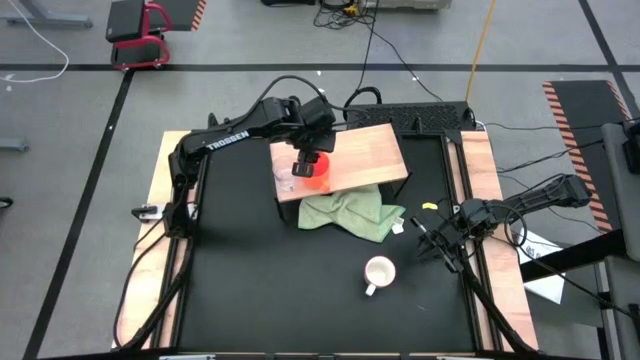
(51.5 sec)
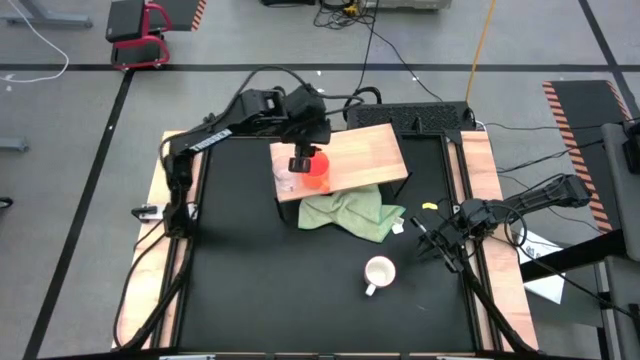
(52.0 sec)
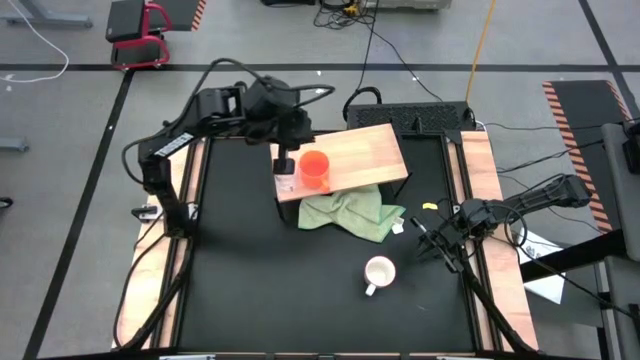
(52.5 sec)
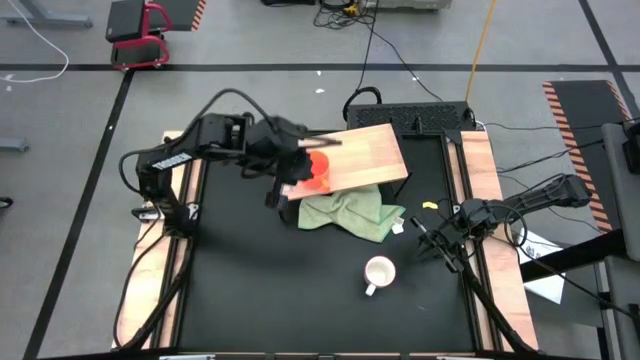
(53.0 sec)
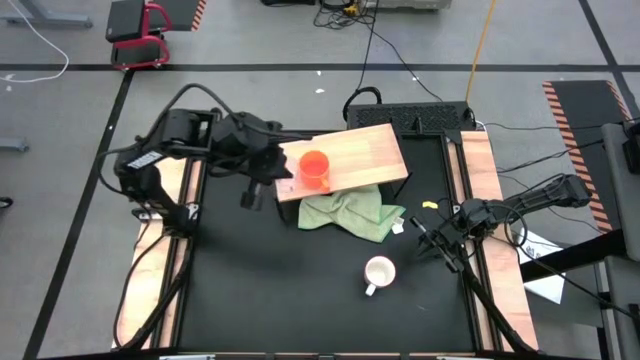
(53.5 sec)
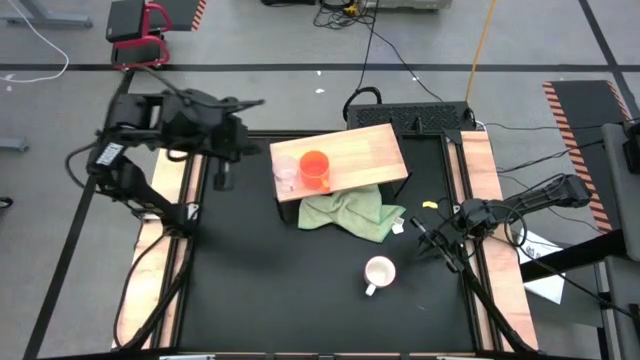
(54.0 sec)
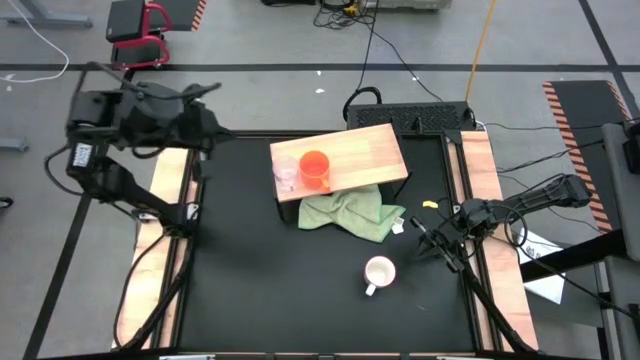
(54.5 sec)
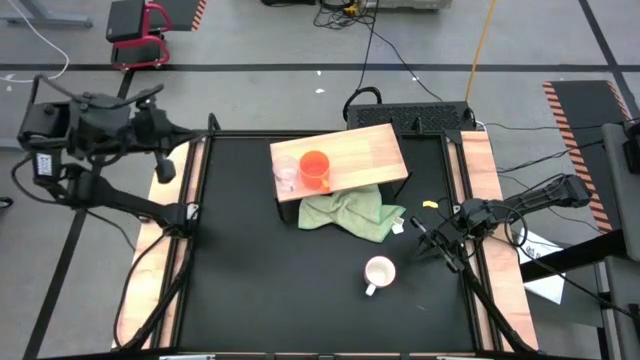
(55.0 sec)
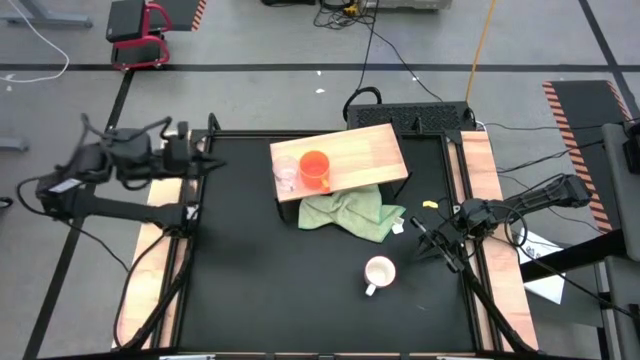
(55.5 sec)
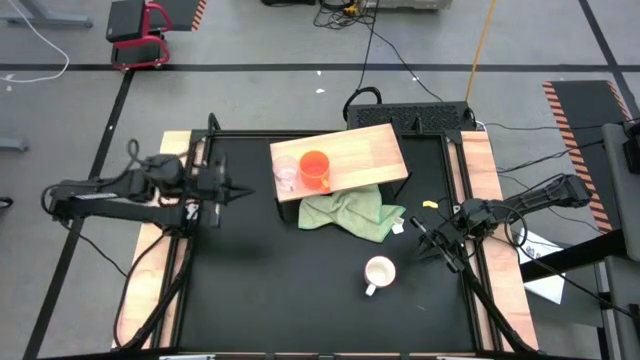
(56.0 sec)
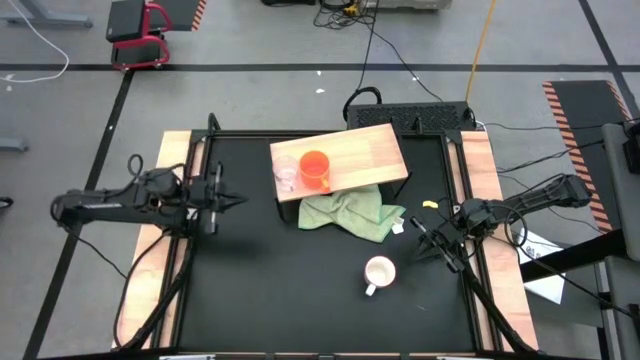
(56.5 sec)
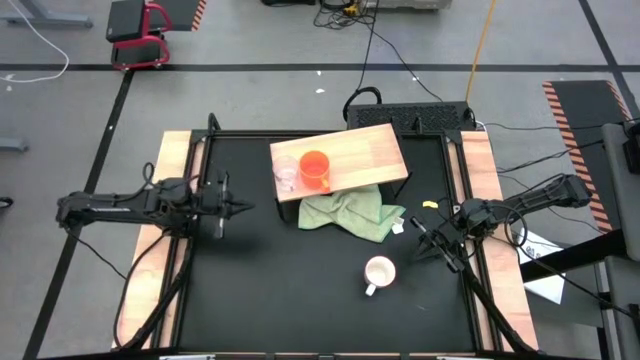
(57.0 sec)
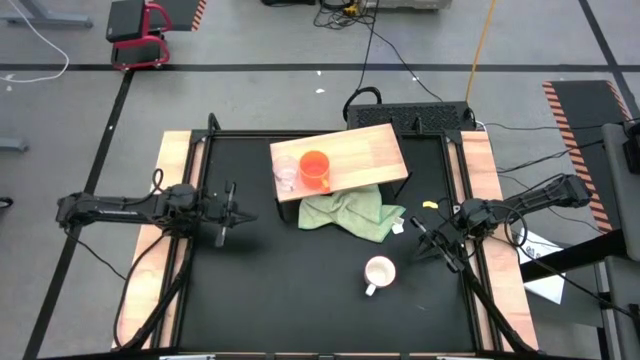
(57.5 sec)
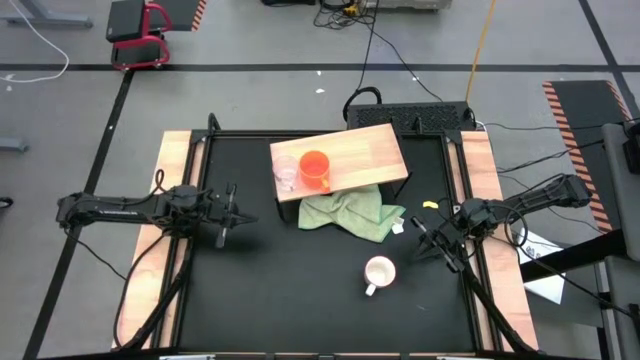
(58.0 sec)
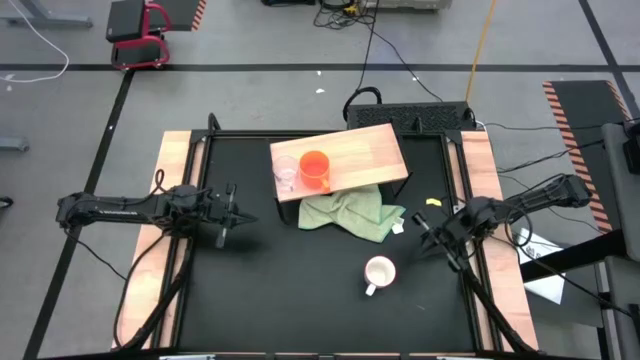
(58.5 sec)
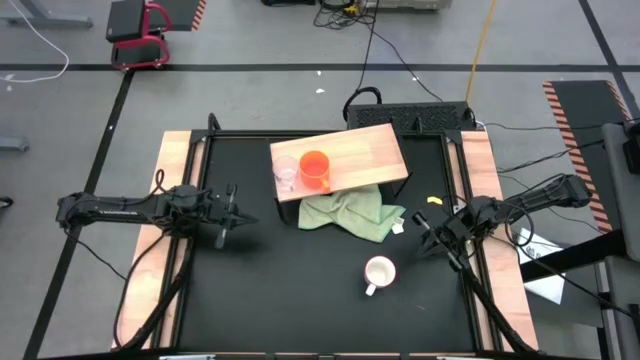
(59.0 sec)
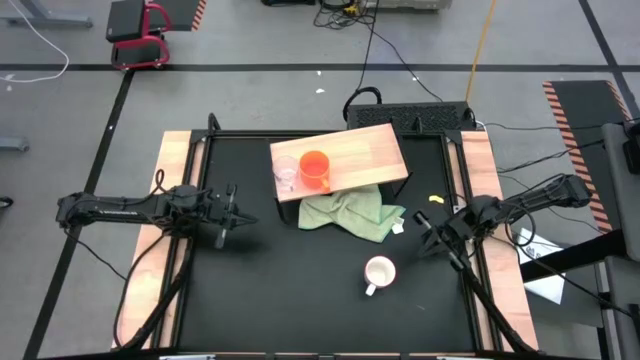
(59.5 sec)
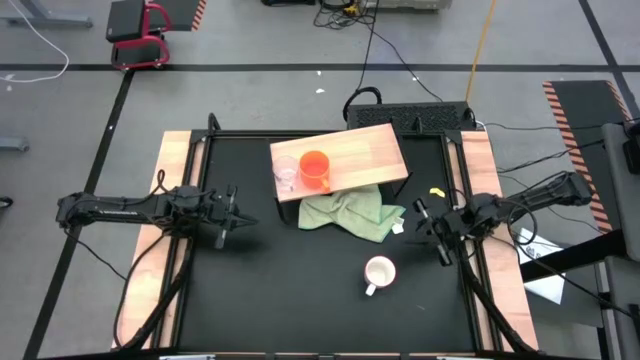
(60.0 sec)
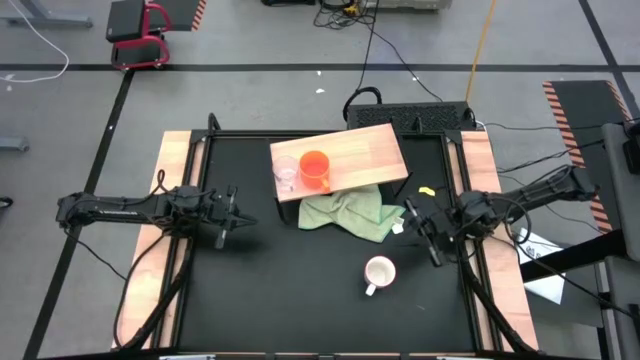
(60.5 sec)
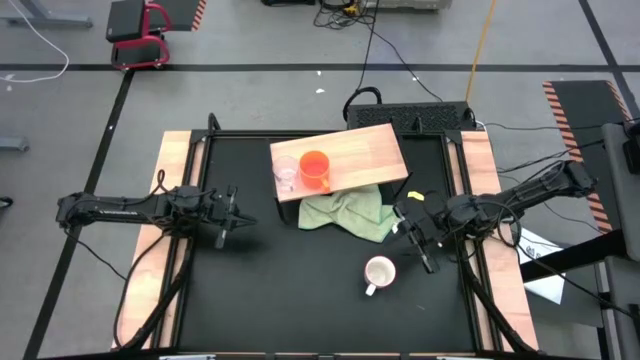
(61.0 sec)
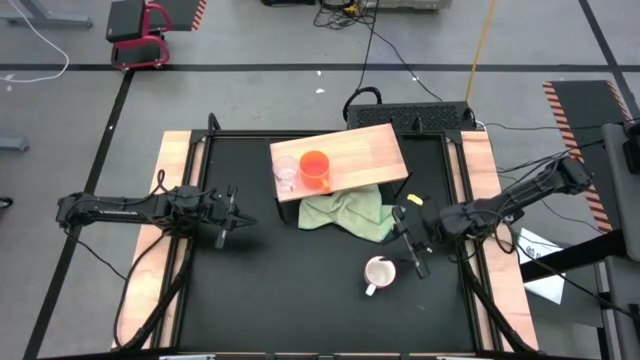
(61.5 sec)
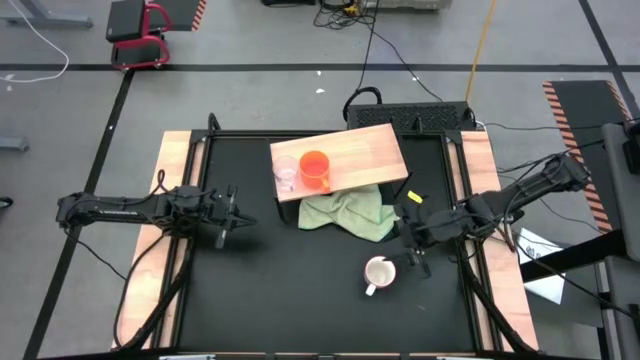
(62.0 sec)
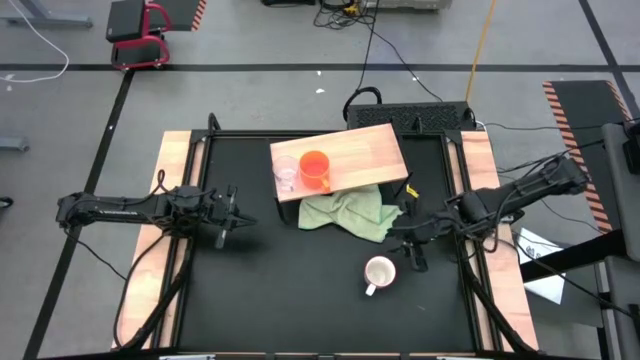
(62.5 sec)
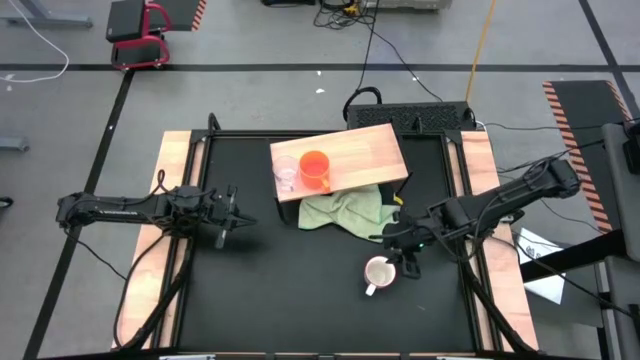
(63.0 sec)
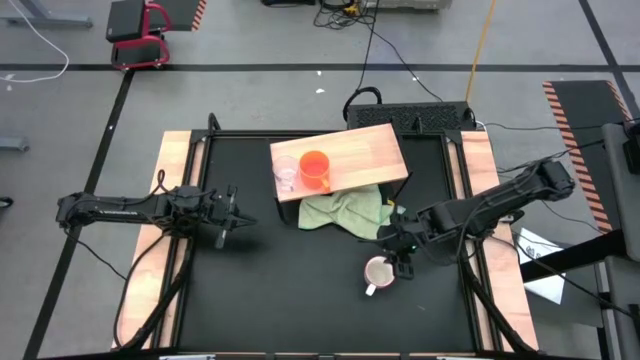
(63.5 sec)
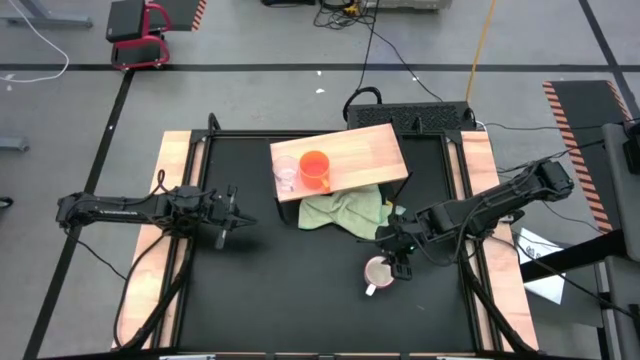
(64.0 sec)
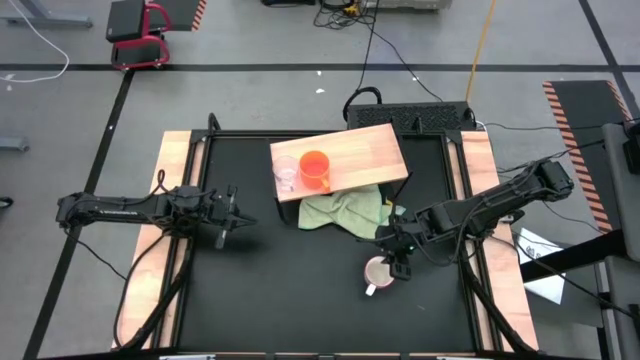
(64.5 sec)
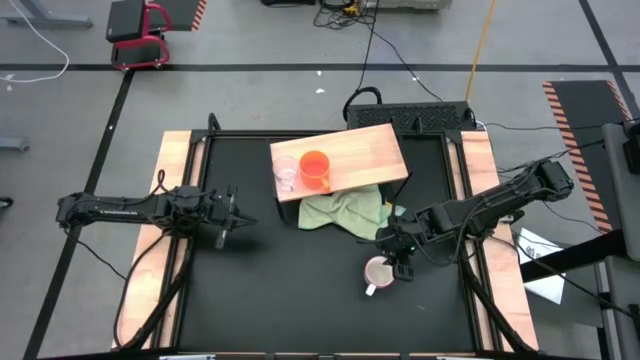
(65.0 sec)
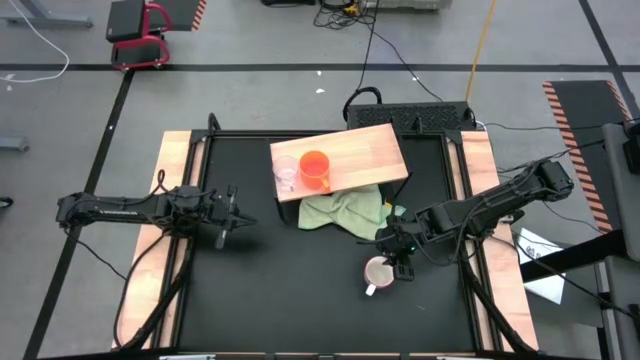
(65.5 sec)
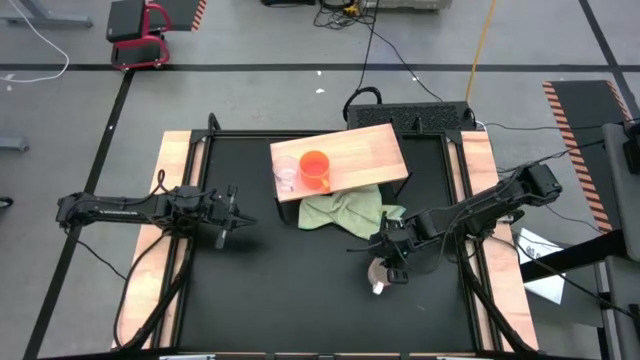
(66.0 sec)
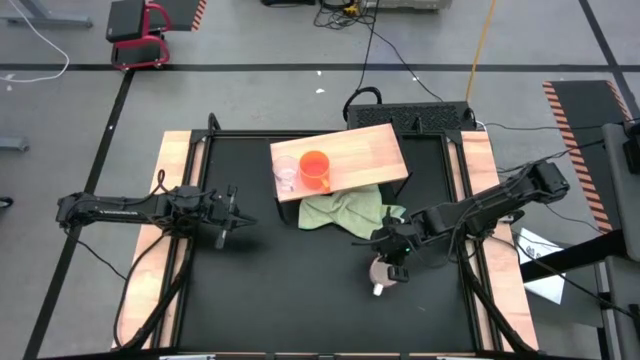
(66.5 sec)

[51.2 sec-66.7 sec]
Task: Stack small to large cups/mugs on shelf
Put white cup on the shelf

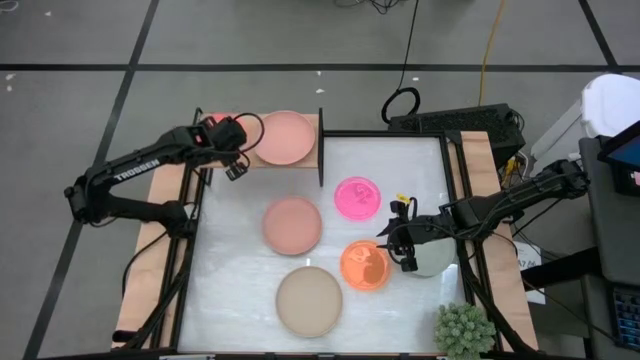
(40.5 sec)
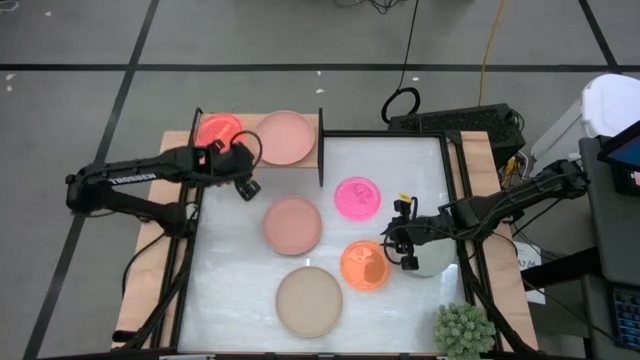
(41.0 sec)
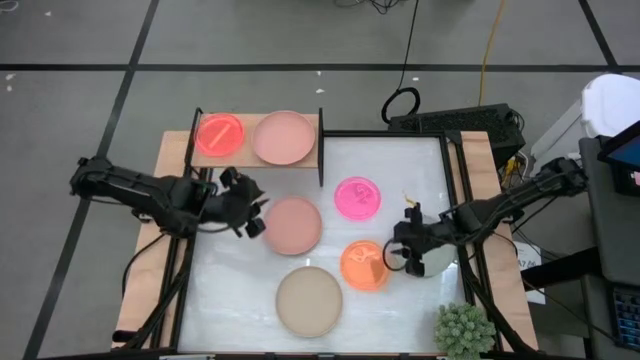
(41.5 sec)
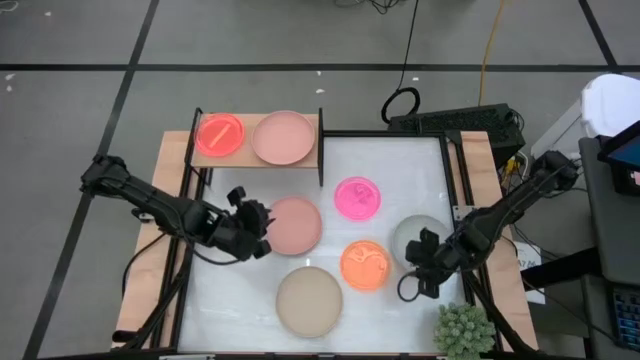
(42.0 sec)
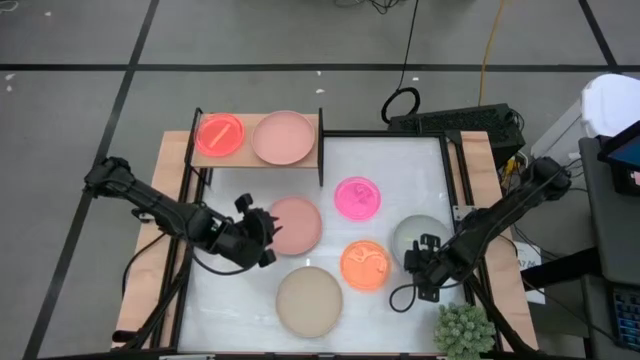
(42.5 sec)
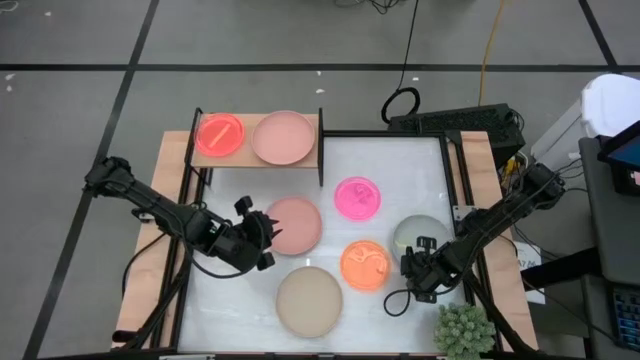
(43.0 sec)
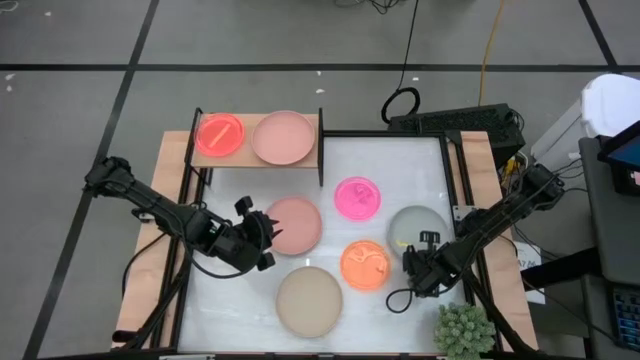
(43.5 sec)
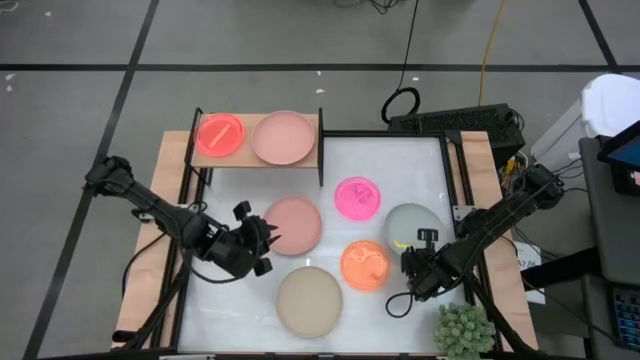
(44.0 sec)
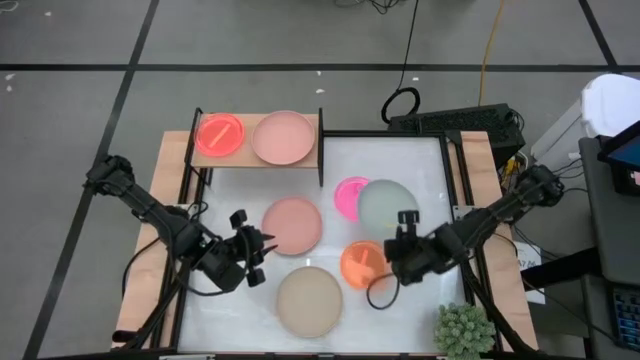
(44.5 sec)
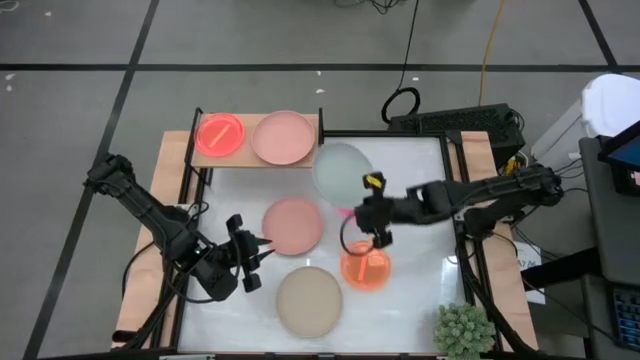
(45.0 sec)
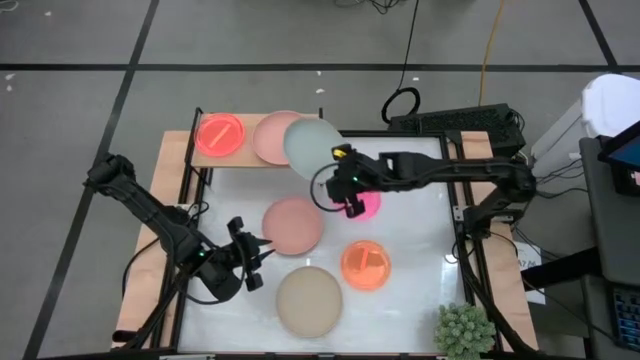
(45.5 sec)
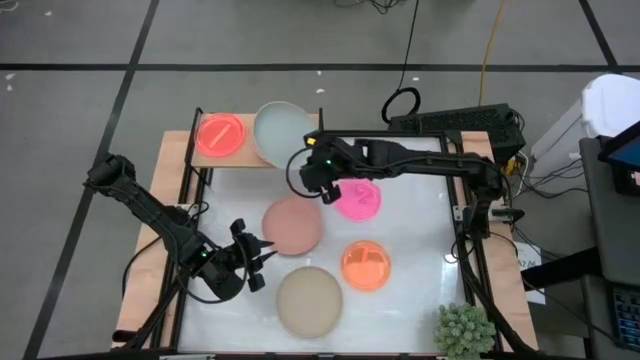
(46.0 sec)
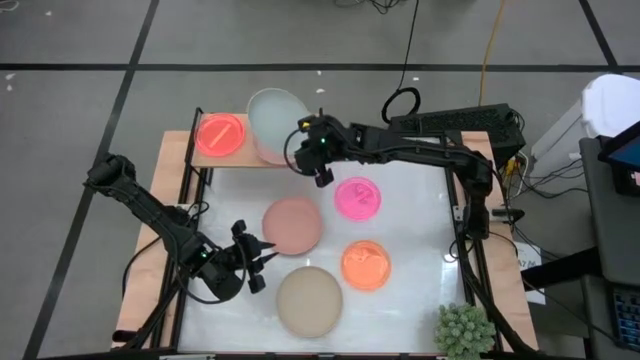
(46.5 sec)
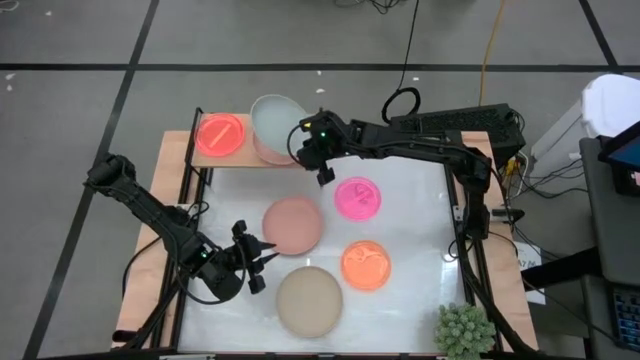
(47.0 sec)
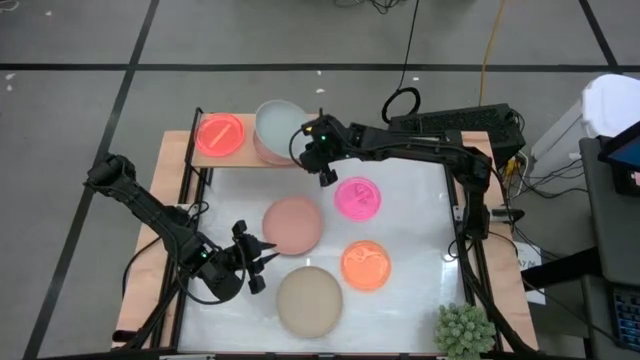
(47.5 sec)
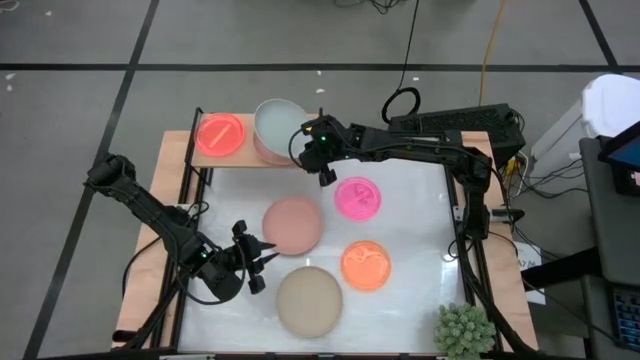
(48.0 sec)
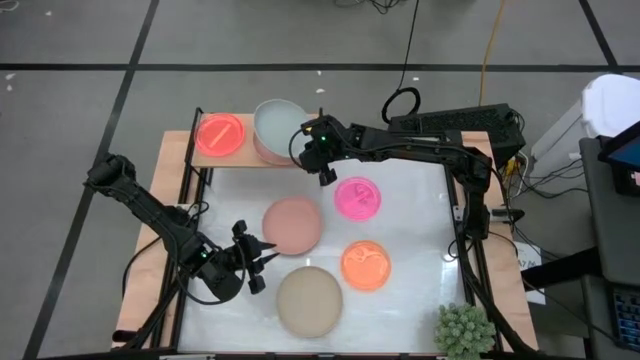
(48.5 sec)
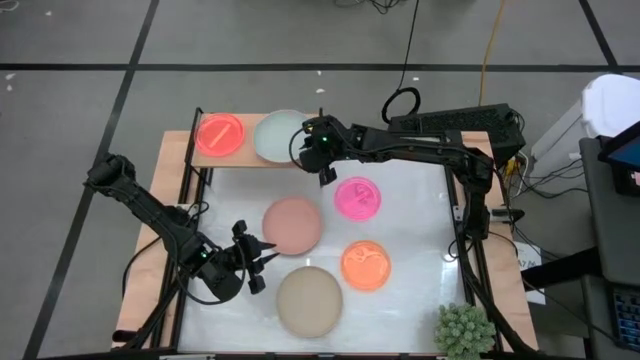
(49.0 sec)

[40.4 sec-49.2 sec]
Task: Place and stack plates onto a shelf
Stack the big gray plate on top of the big light orange plate on the shelf
